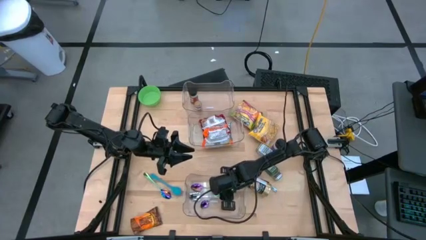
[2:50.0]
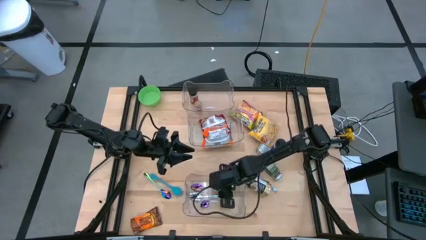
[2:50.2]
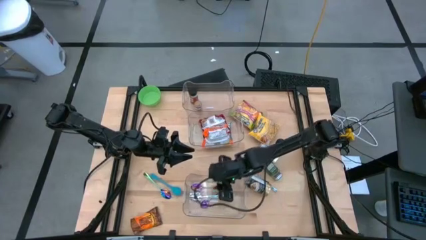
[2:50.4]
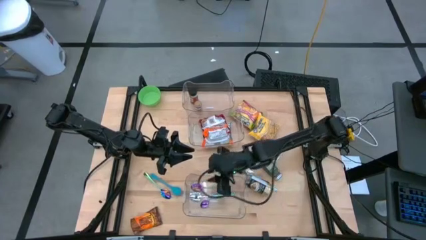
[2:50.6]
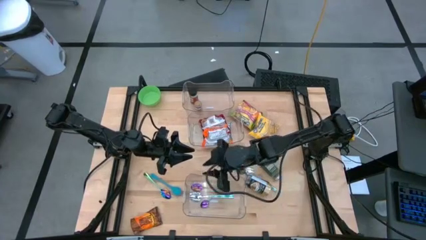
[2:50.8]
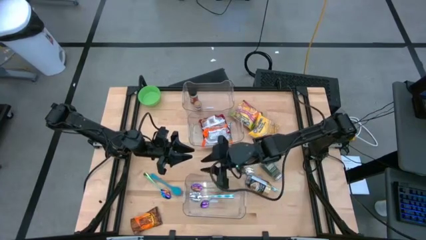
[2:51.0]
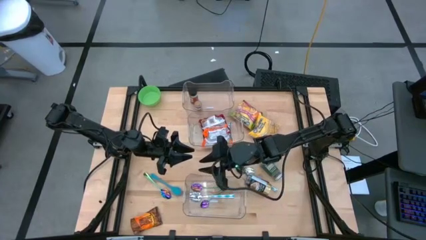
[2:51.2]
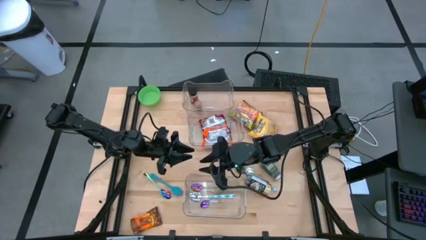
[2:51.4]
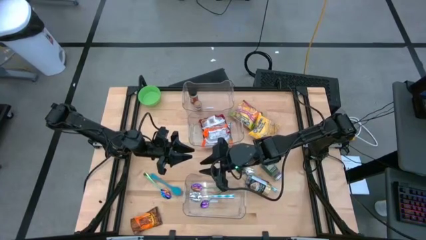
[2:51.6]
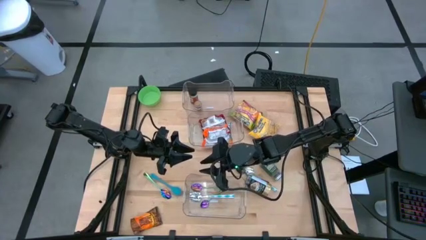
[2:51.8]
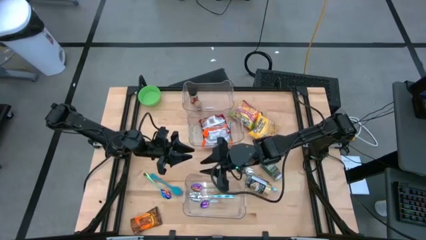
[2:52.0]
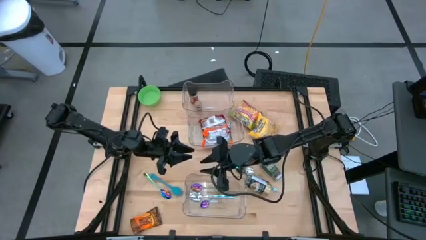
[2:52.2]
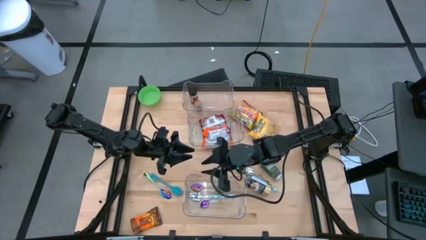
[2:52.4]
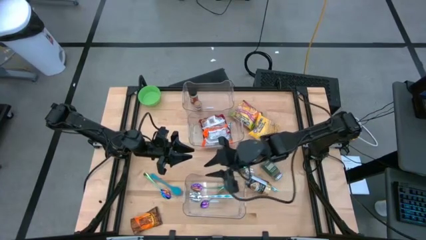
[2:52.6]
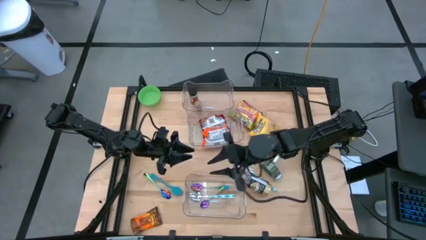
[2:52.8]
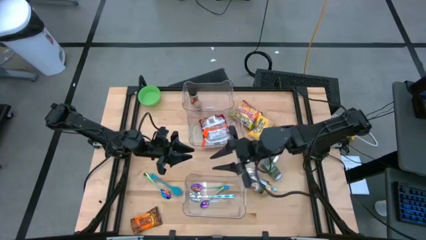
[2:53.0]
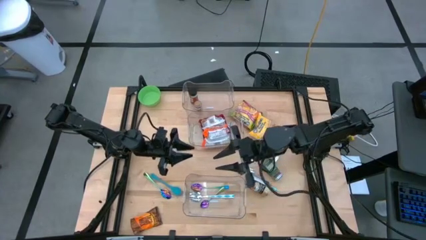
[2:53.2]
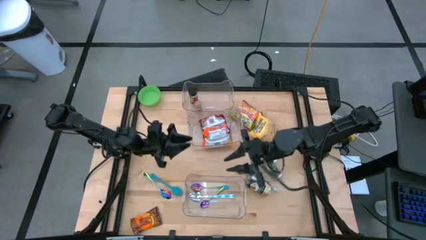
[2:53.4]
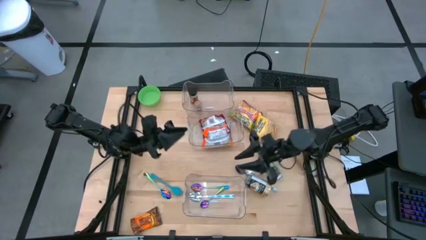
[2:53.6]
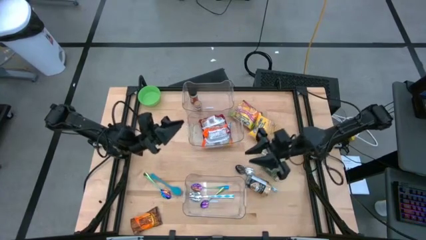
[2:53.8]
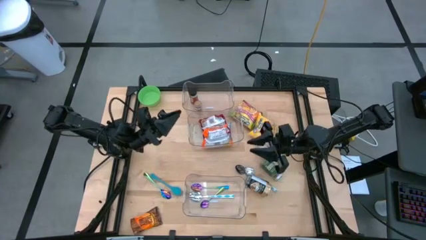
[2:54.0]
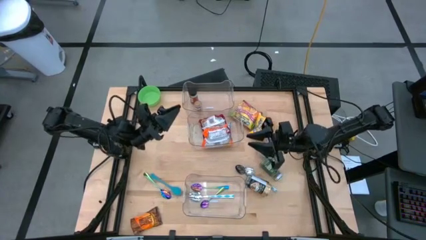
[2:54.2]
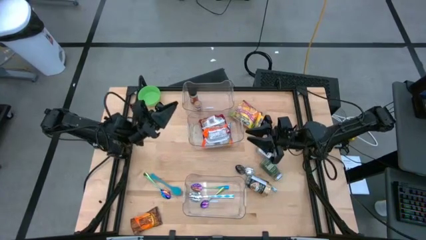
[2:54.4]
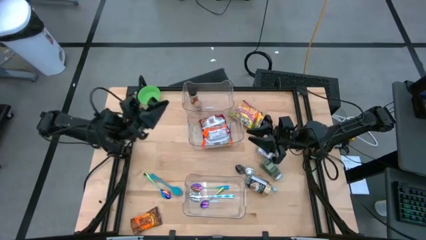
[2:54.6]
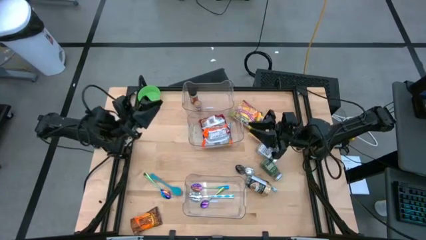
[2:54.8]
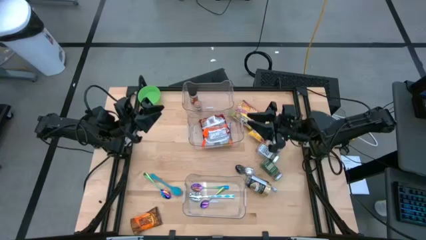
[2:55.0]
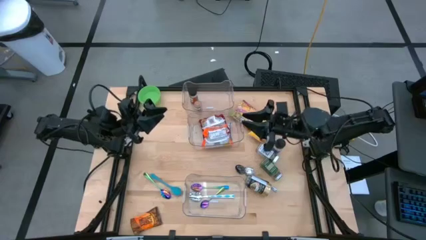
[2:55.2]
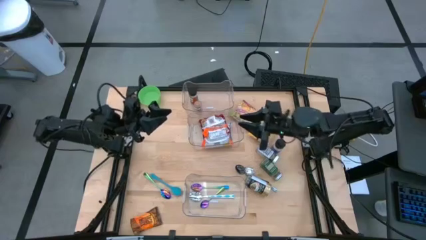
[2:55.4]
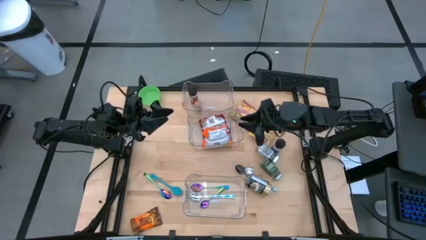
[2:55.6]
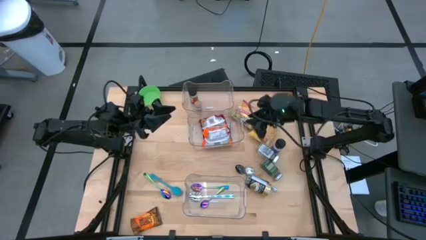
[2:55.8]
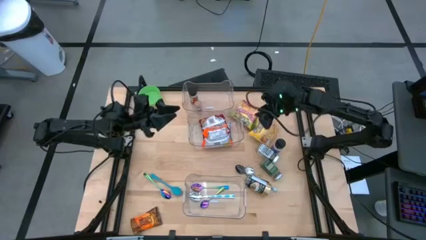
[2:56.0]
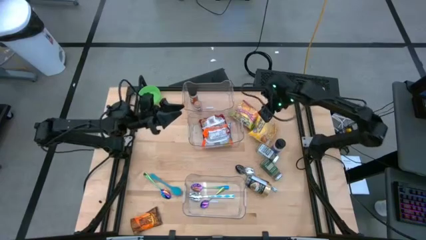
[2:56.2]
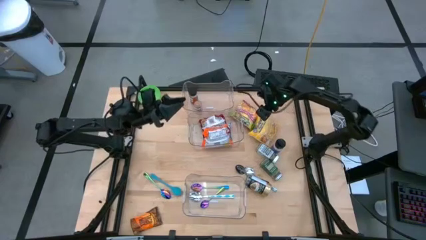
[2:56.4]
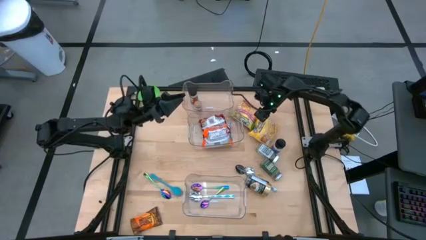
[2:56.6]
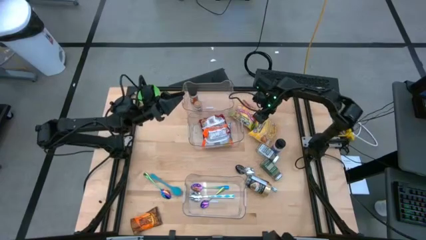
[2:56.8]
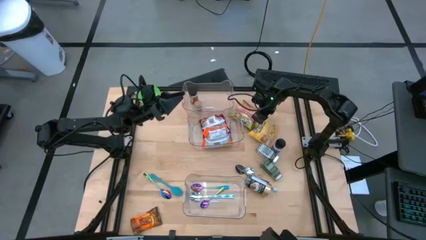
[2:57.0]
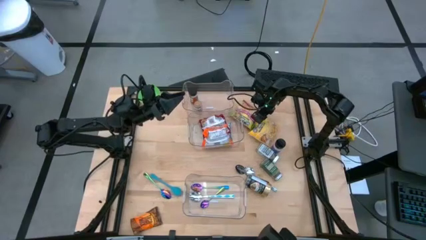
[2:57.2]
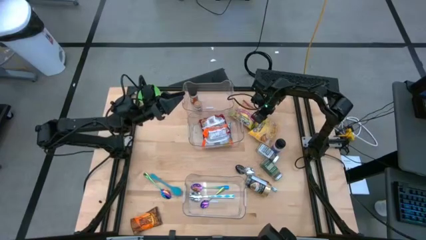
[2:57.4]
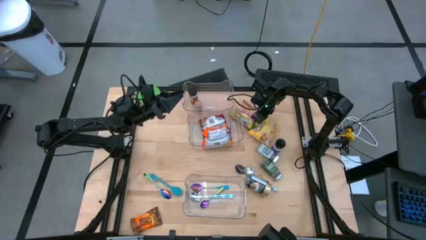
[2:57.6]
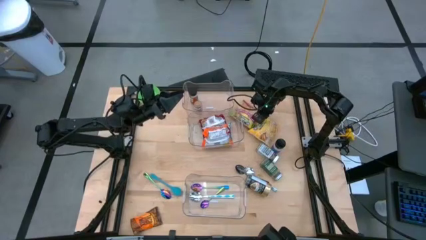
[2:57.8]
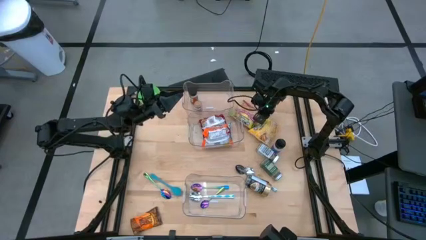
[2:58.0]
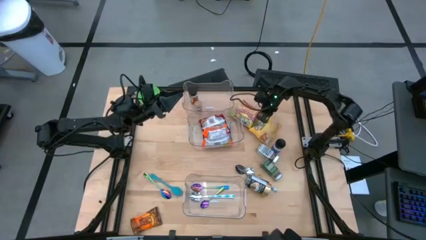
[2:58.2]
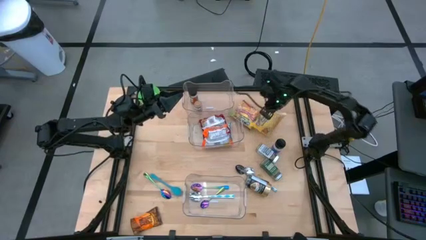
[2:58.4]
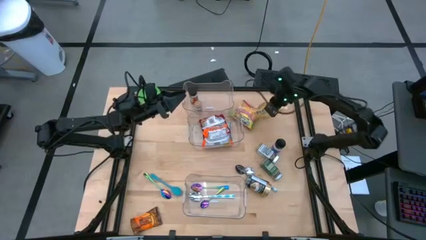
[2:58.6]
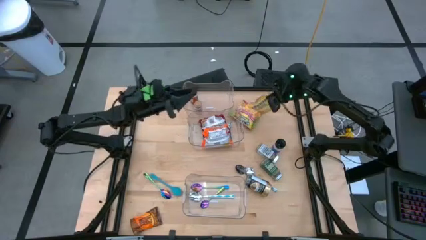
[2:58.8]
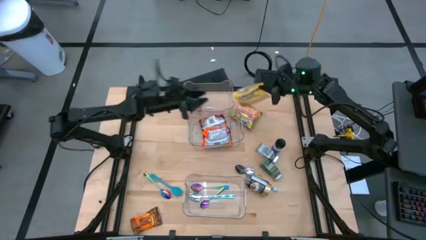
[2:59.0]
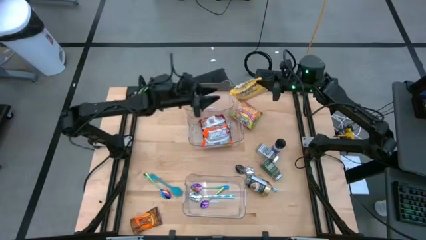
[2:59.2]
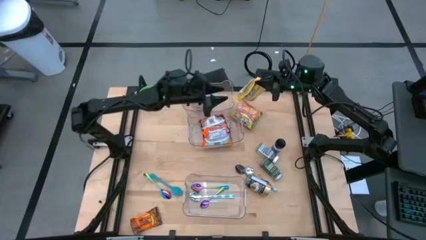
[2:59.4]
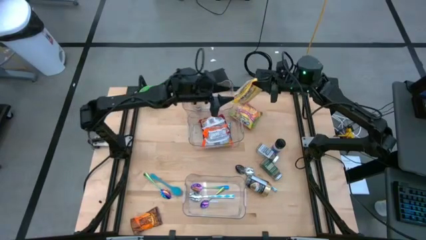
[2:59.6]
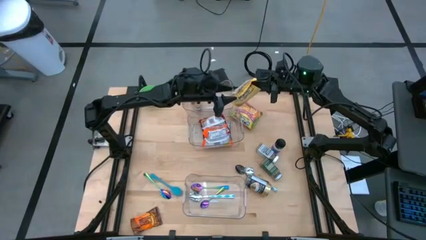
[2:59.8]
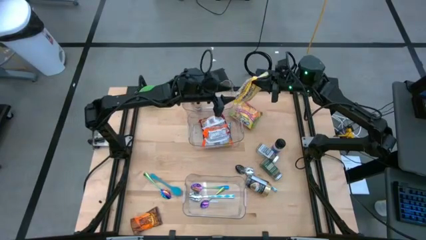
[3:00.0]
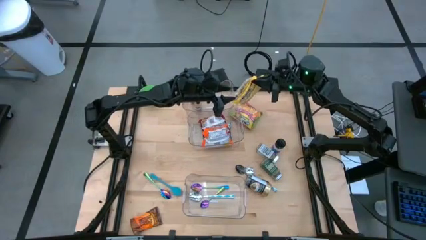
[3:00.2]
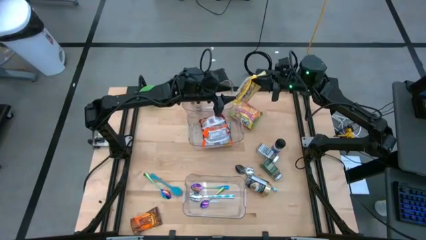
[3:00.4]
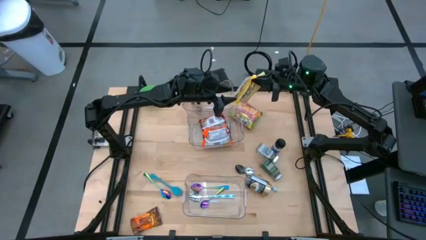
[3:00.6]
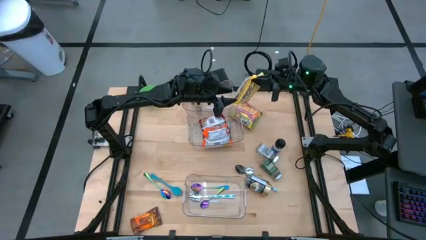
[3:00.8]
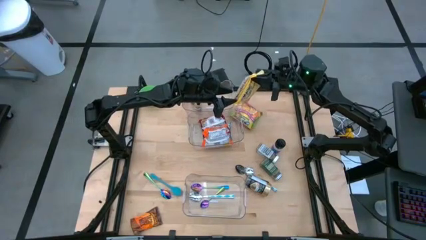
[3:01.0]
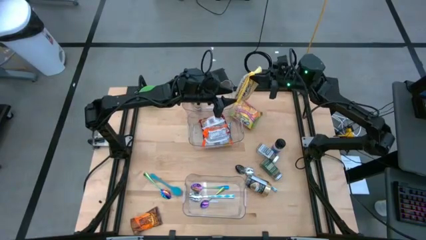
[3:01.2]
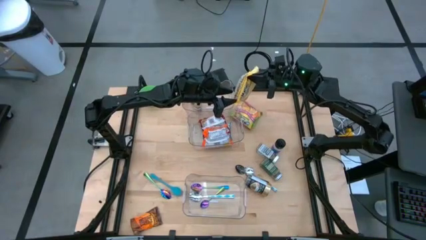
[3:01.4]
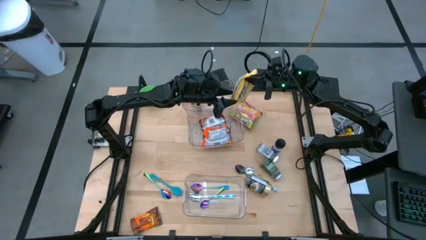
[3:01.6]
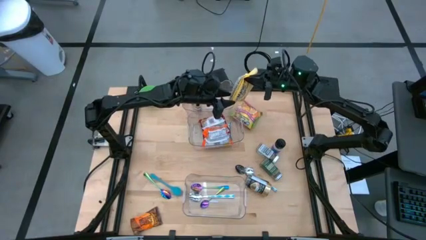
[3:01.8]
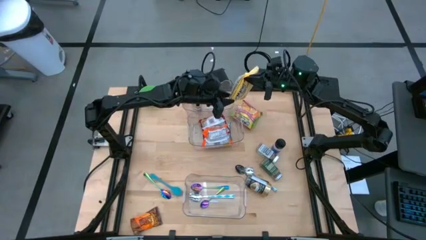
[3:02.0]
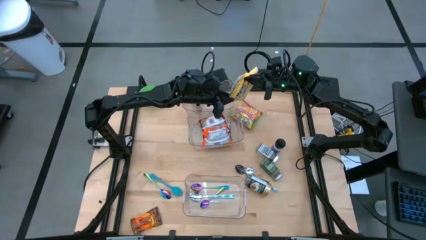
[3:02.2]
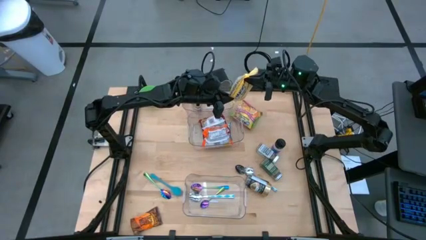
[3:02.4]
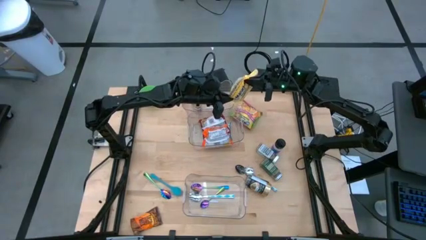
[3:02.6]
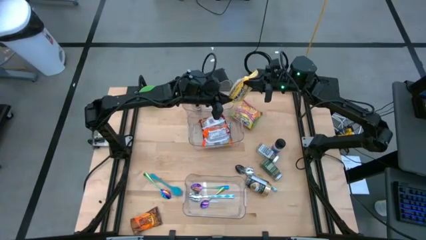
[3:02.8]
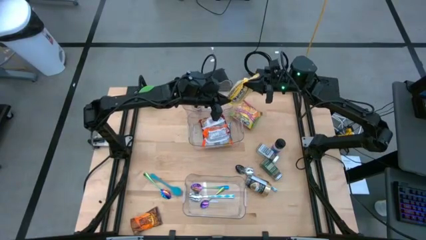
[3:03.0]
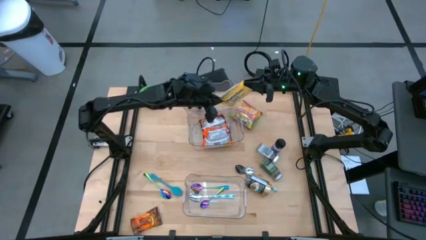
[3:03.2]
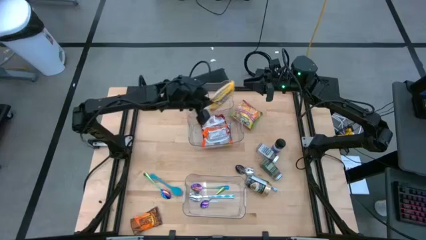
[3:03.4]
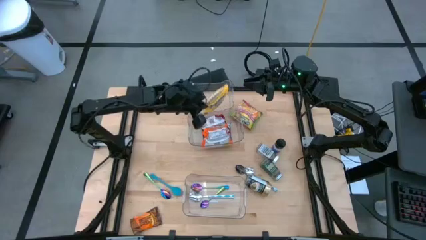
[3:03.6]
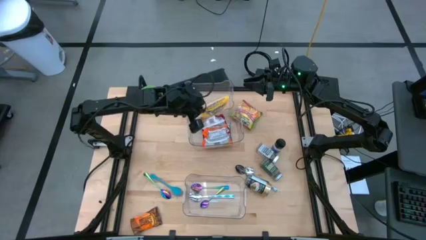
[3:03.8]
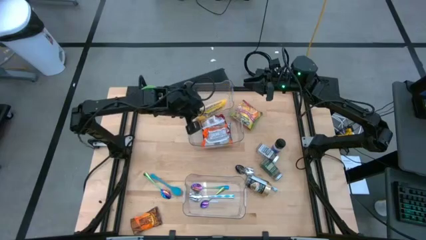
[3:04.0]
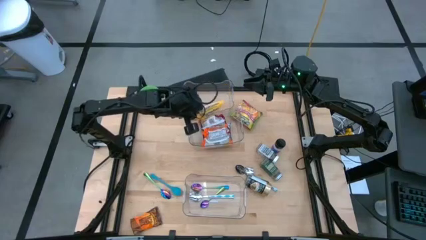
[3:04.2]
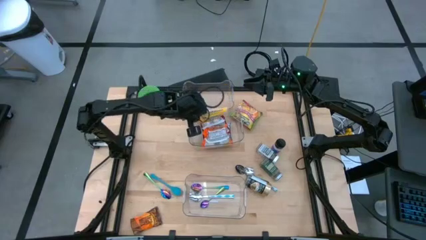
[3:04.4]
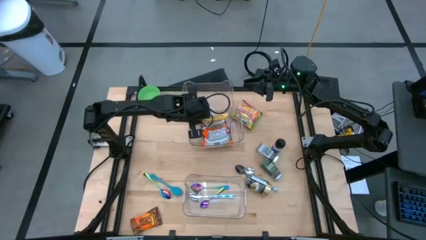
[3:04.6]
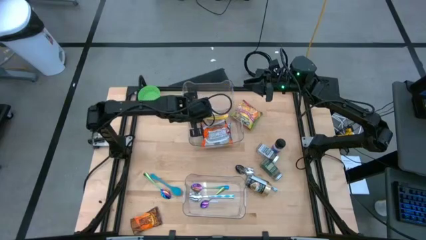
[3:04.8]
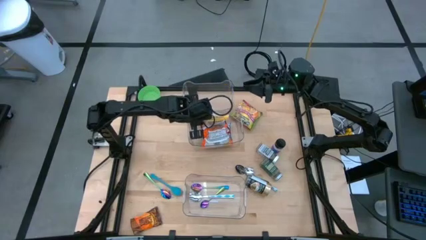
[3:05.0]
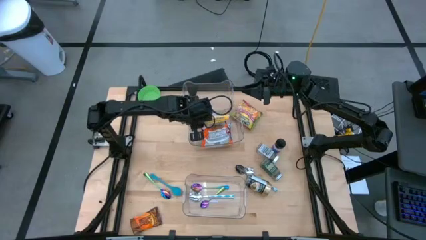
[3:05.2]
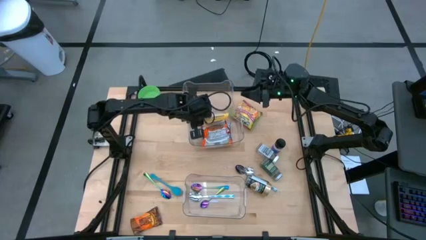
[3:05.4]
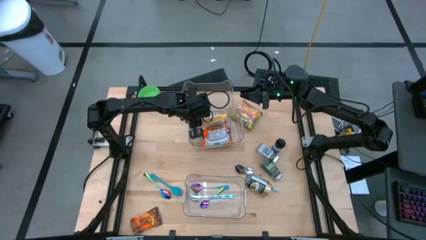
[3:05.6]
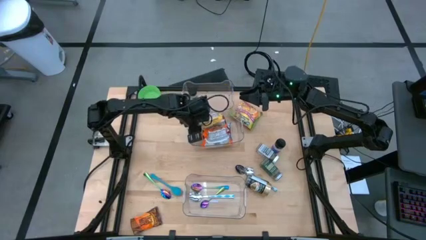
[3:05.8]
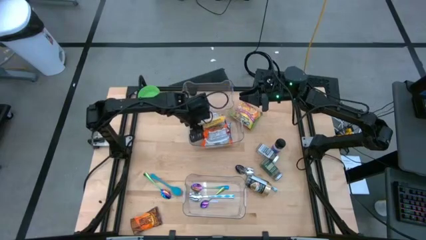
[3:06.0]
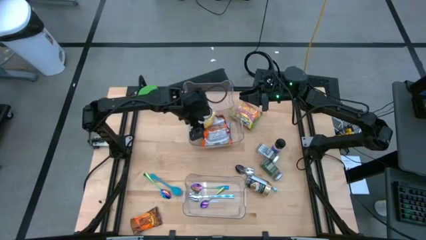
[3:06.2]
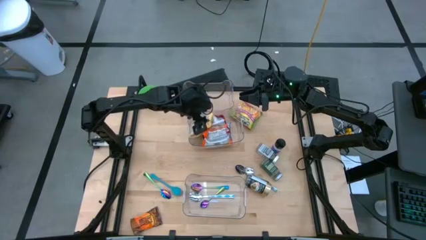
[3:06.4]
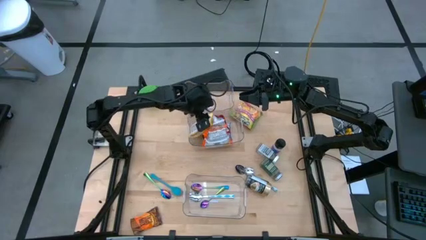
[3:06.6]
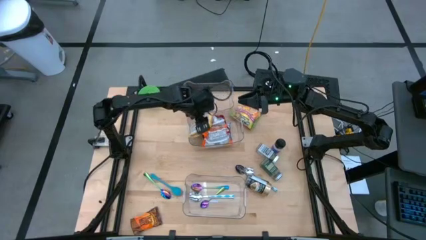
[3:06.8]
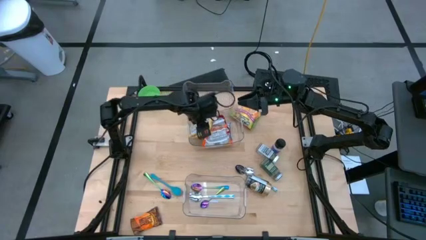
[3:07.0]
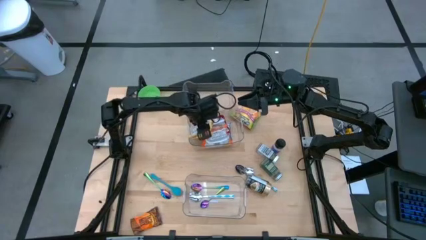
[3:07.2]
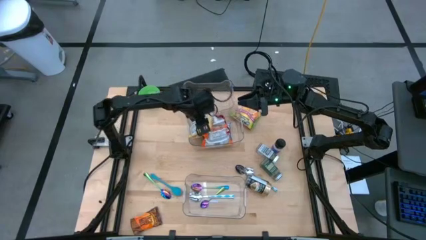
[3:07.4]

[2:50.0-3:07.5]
Task: Pick & Place Food Item
Put the yellow noodle pack into the middle transparent bin
